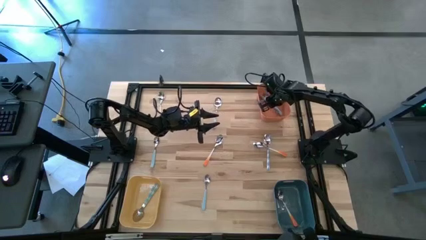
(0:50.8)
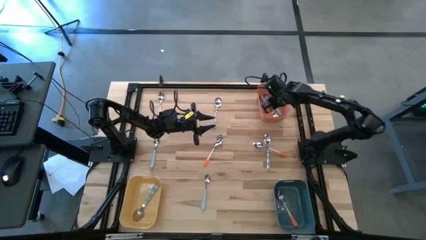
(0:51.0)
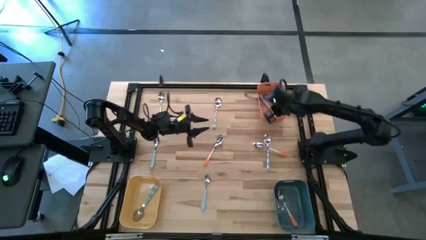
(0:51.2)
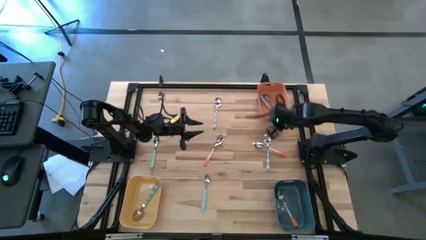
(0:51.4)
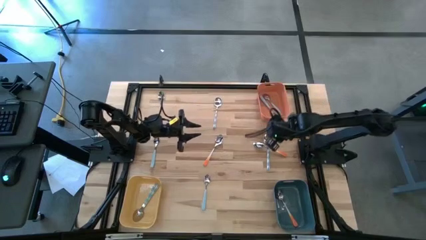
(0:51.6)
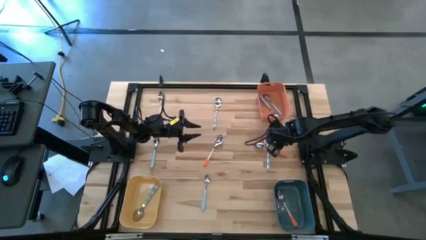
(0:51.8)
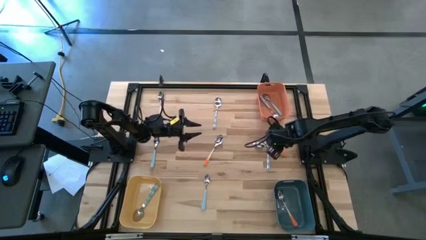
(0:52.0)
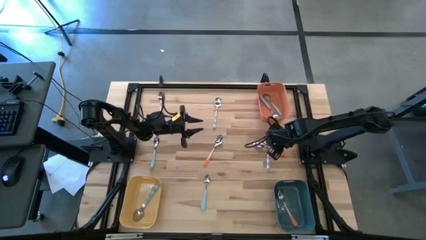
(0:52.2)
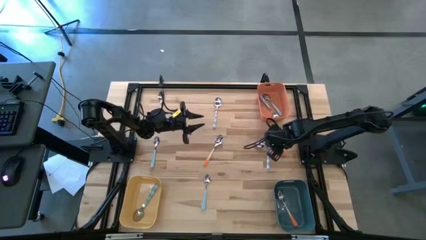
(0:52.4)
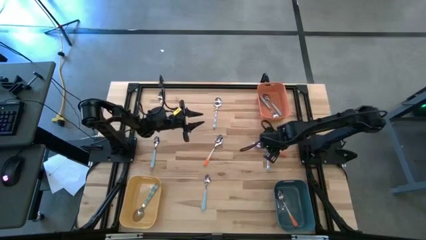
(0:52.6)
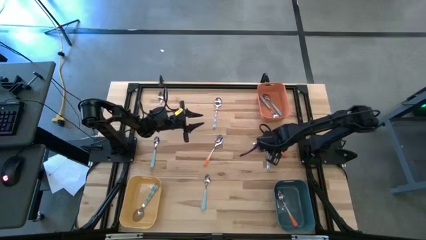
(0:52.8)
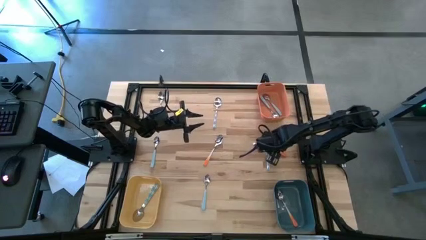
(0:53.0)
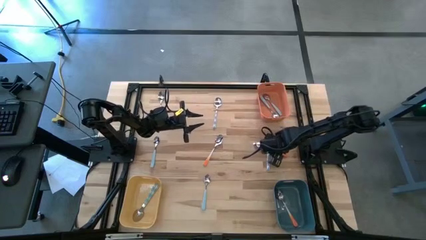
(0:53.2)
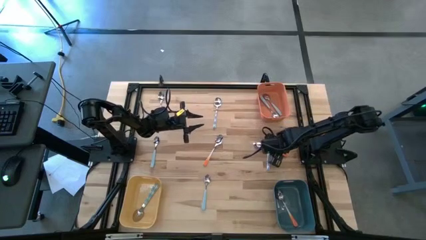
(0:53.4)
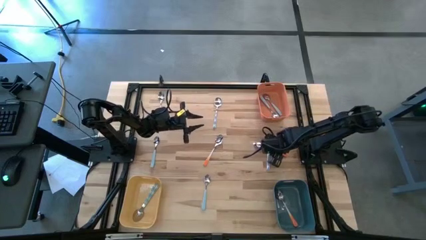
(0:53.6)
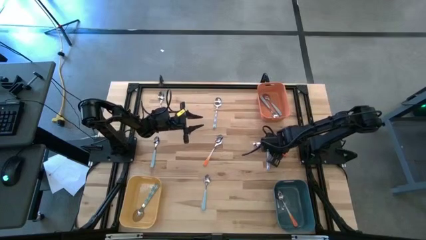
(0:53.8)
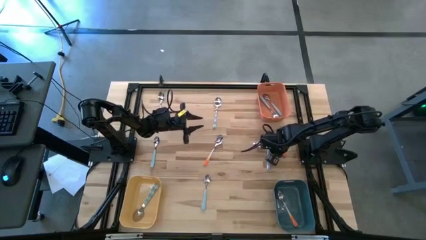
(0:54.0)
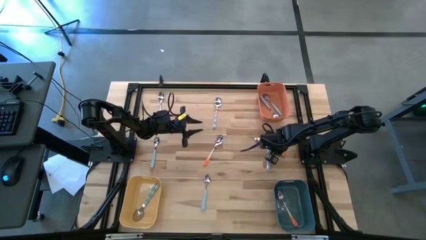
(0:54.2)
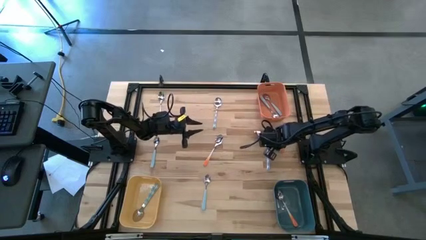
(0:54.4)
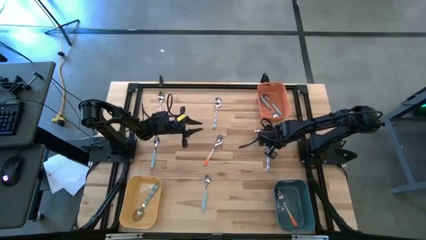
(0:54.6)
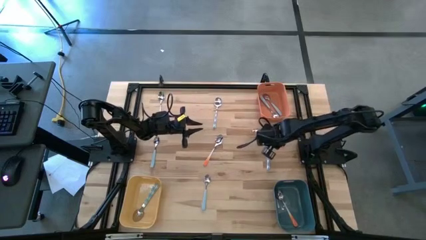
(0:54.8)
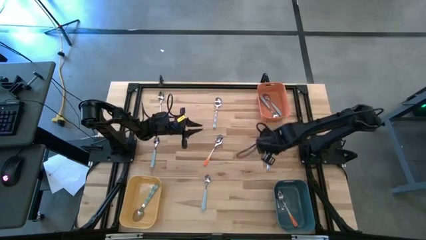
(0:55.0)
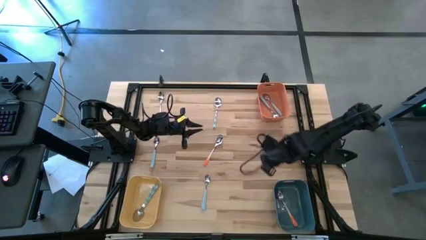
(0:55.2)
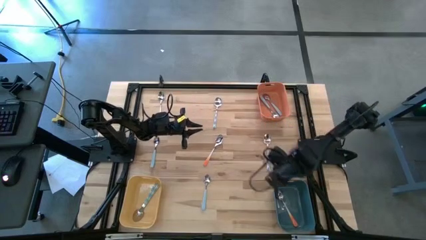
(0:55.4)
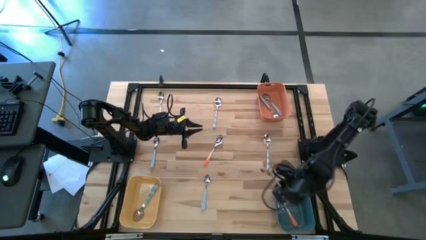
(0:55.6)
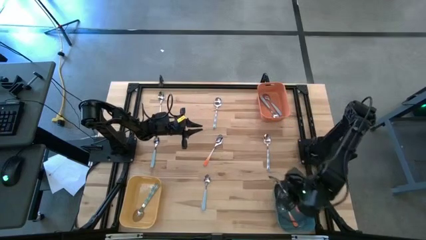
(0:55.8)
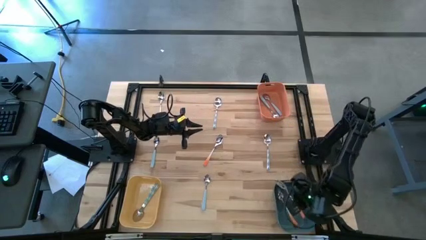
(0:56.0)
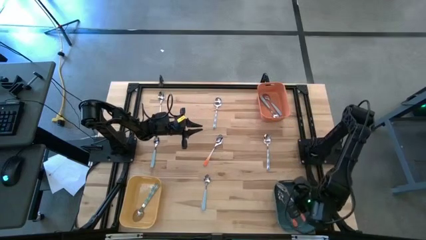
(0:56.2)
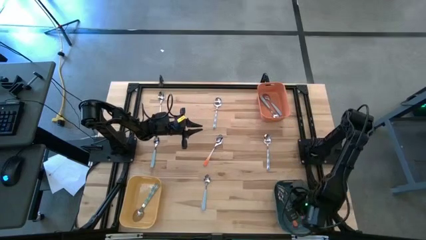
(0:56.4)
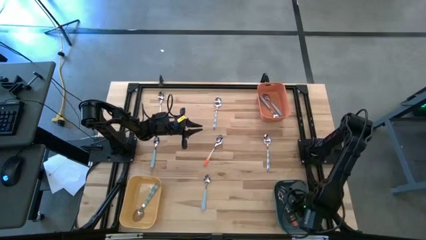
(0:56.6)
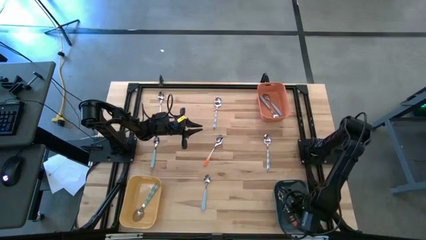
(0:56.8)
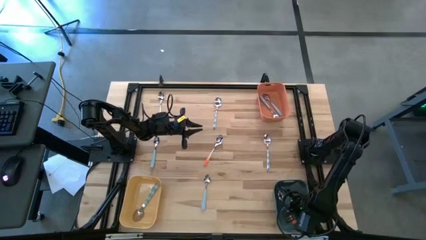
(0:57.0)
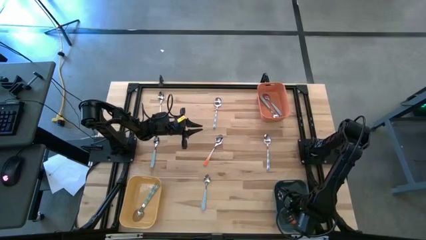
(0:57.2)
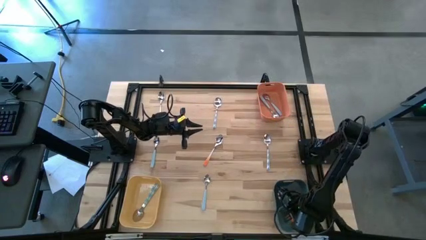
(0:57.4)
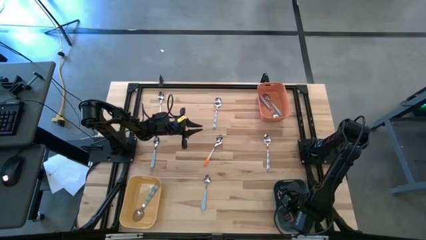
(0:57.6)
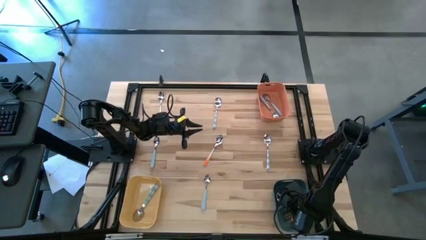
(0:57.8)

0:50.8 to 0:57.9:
Task: Sort silverware by color (type)
Put the middle right orange spoon into the dark blue bin

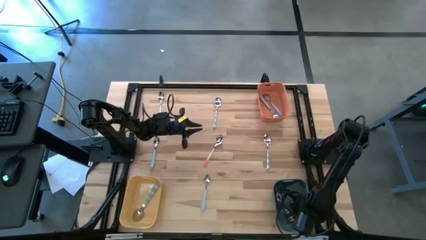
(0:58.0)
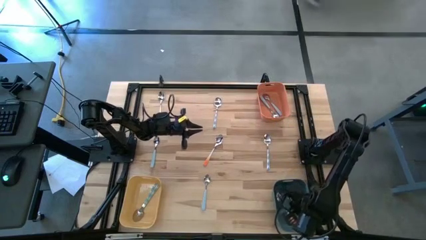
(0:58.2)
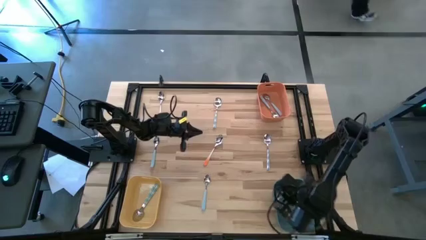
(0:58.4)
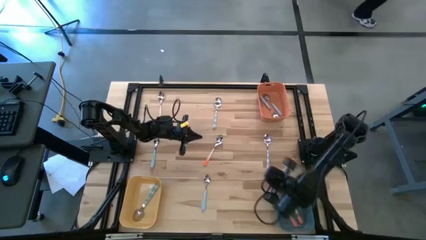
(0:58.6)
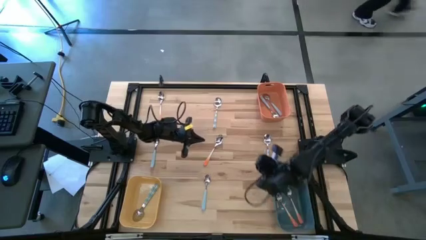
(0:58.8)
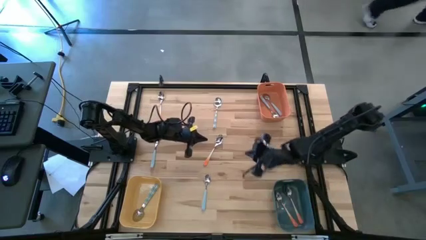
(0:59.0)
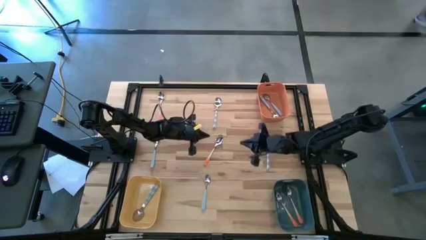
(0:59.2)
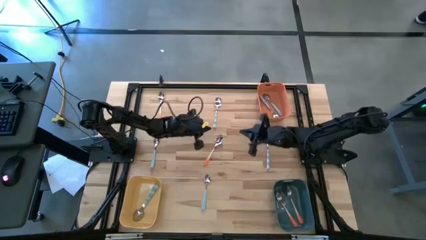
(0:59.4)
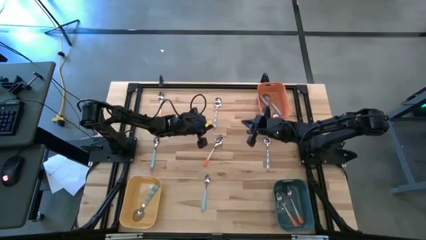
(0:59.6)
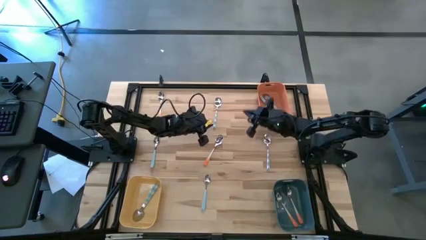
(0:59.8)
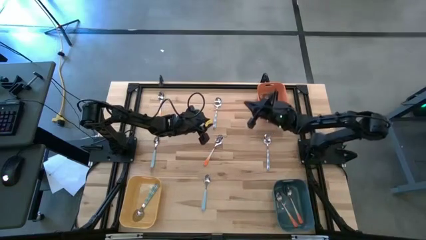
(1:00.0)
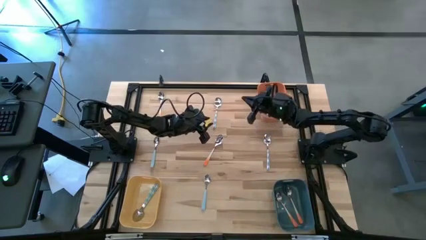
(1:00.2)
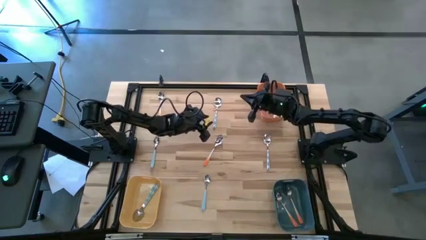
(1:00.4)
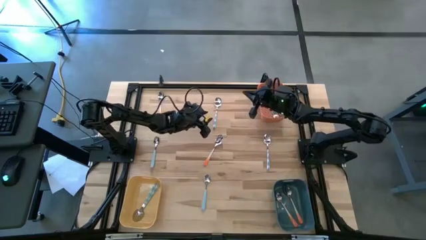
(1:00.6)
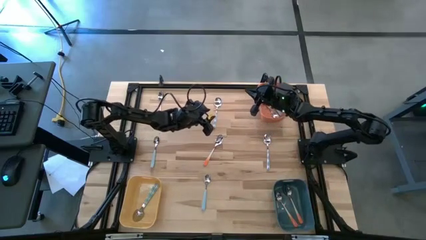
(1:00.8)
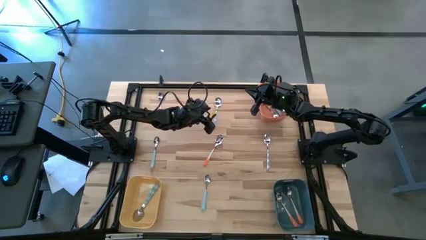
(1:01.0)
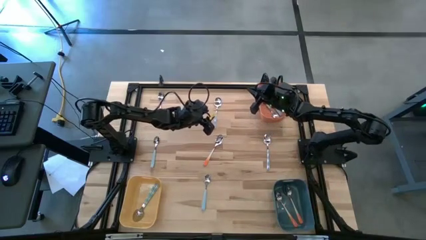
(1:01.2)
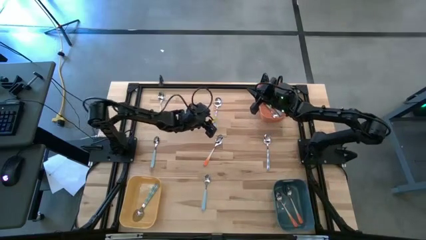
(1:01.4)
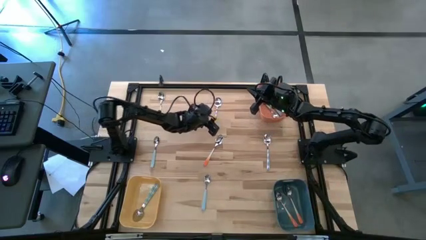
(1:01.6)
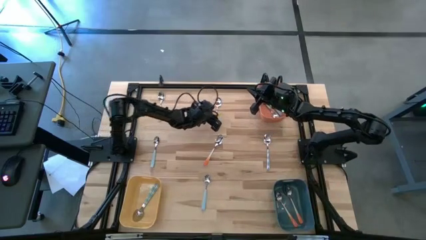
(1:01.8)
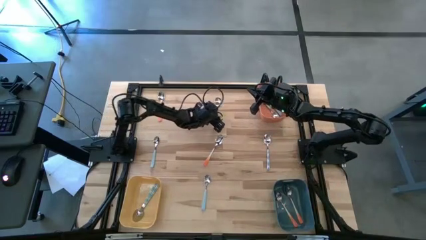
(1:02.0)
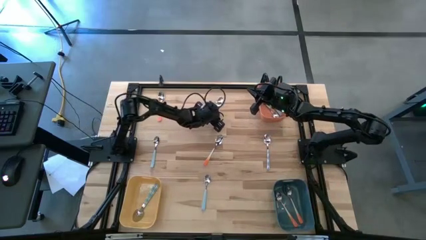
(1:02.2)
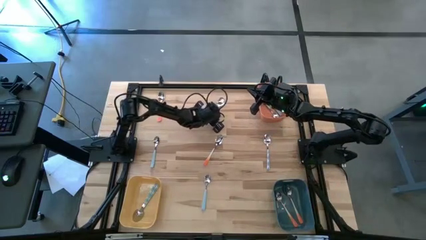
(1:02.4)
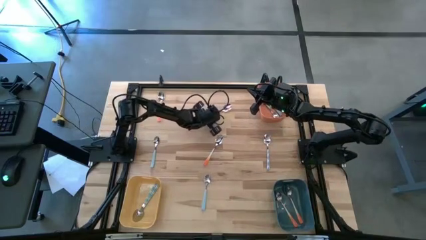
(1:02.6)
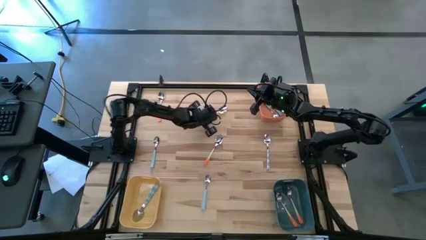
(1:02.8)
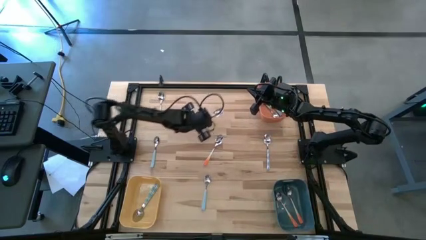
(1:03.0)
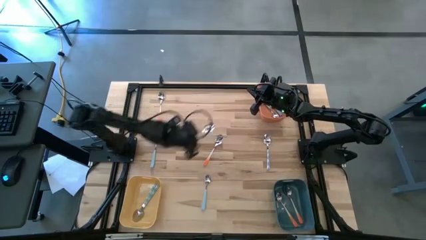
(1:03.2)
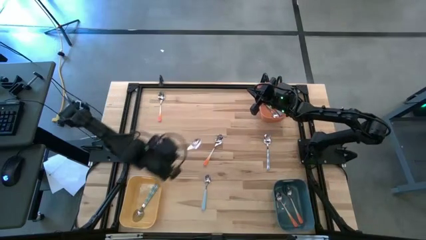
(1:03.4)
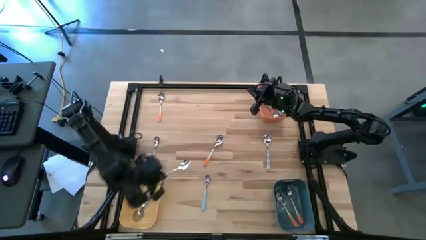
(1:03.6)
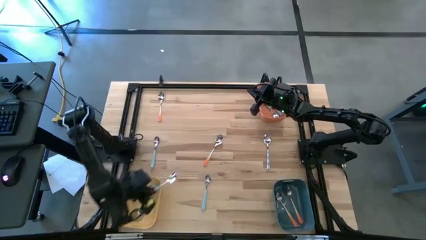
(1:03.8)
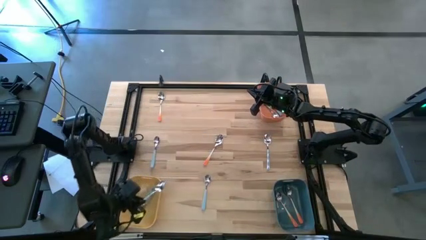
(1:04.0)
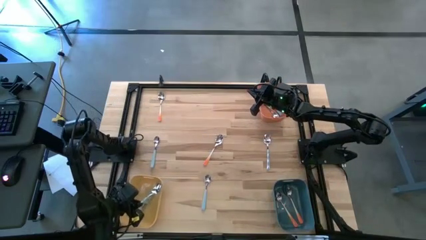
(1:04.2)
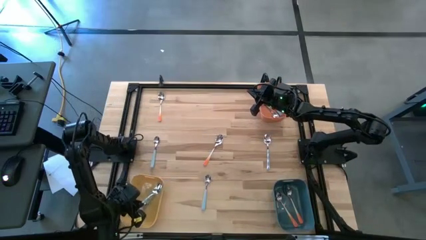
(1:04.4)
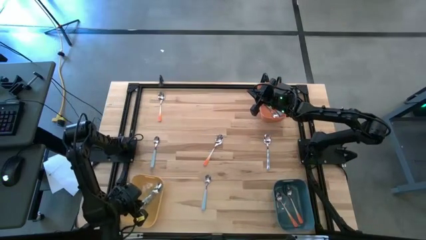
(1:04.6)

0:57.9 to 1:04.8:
Put the top left light blue patterned spoon into the yellow bin
